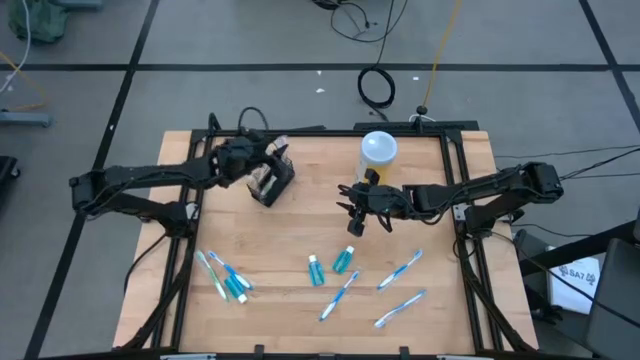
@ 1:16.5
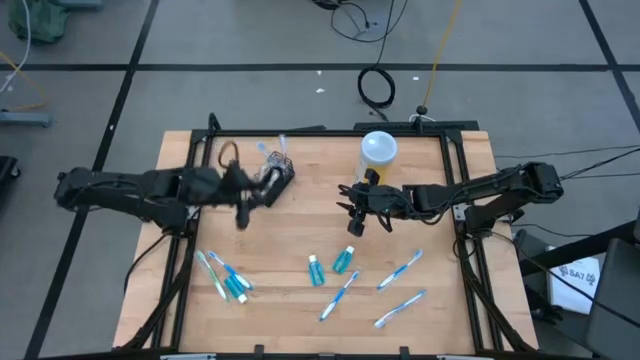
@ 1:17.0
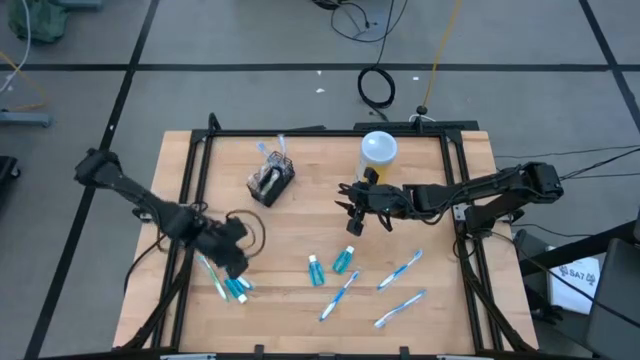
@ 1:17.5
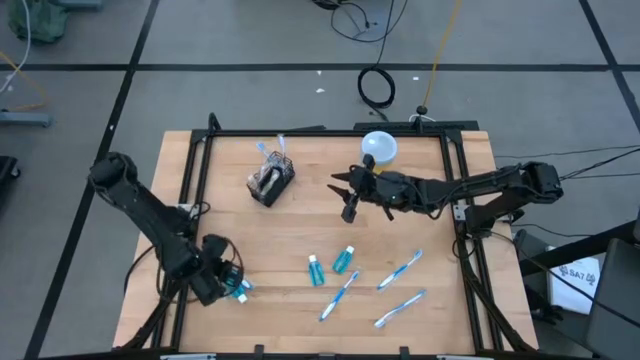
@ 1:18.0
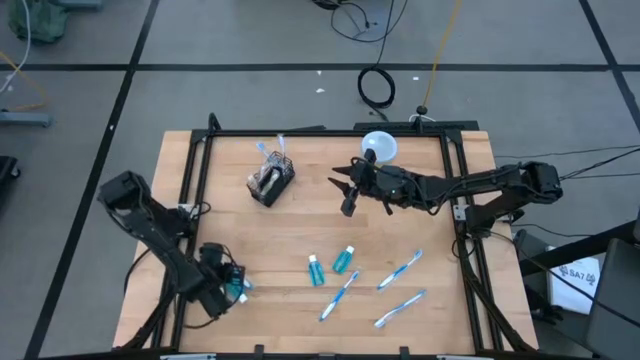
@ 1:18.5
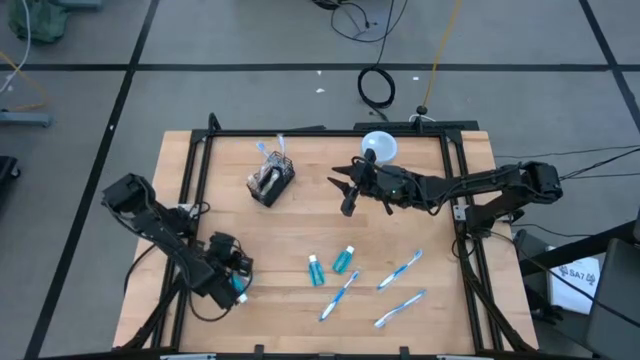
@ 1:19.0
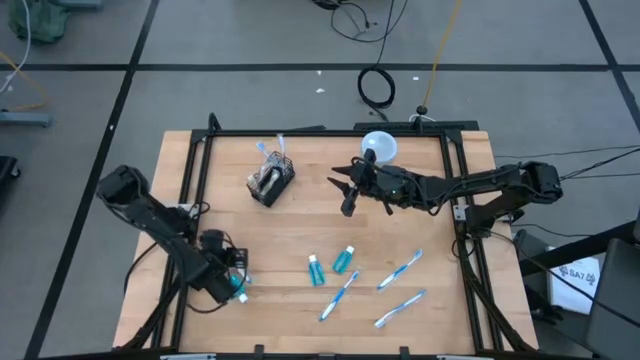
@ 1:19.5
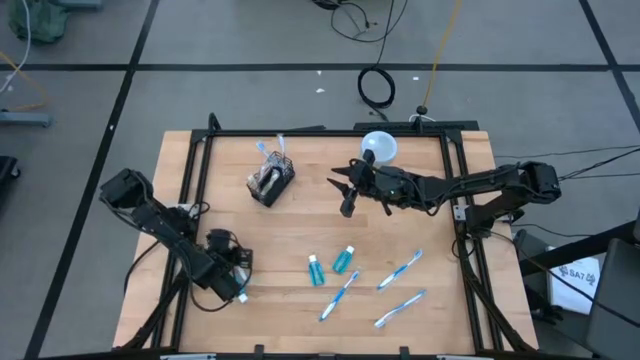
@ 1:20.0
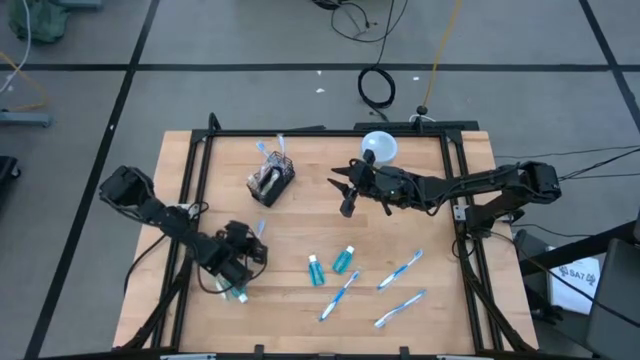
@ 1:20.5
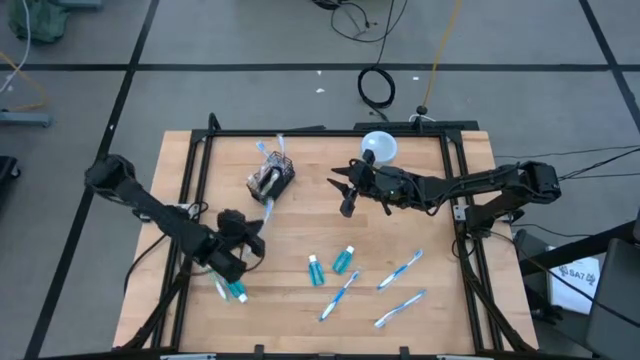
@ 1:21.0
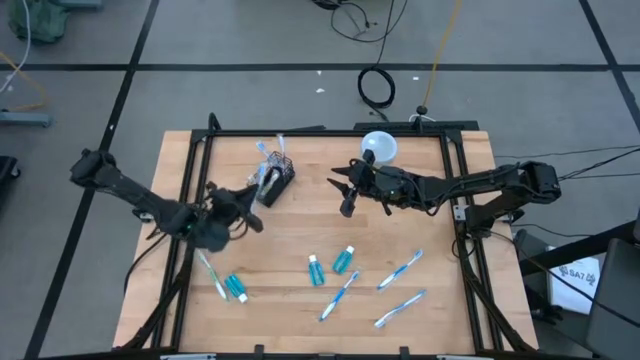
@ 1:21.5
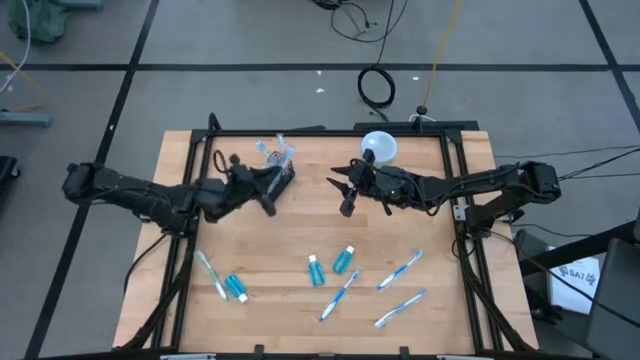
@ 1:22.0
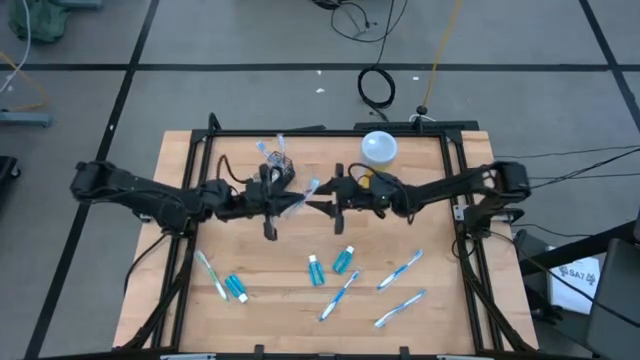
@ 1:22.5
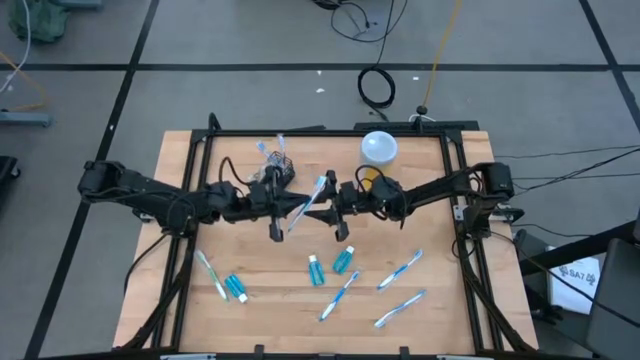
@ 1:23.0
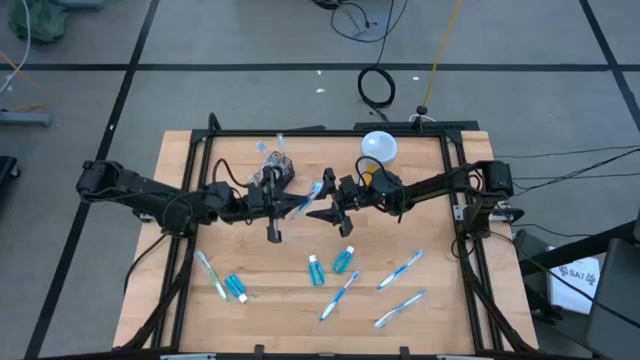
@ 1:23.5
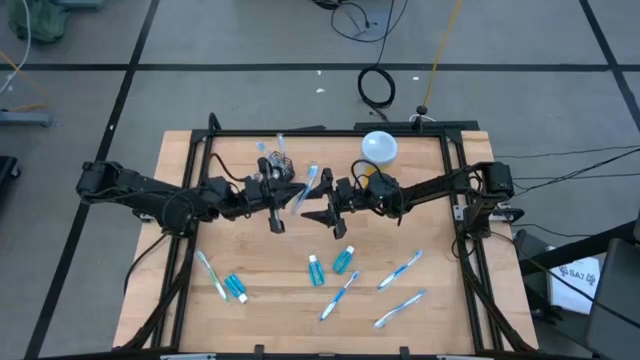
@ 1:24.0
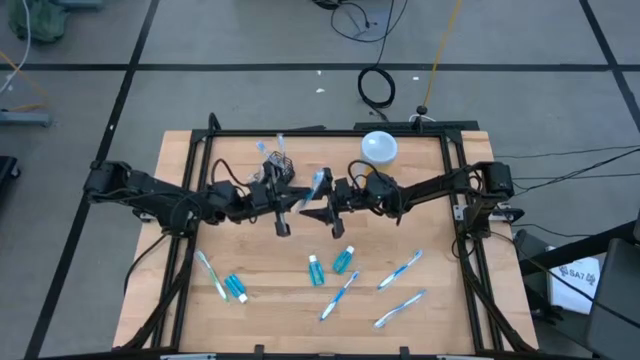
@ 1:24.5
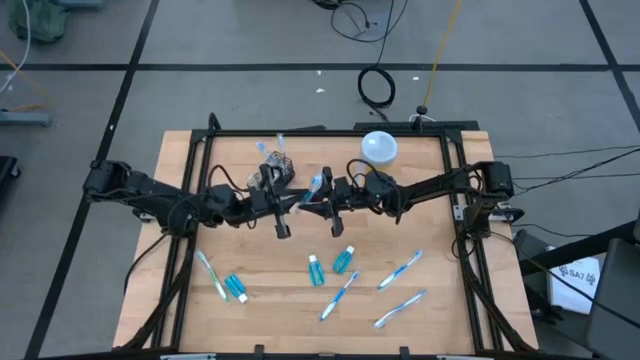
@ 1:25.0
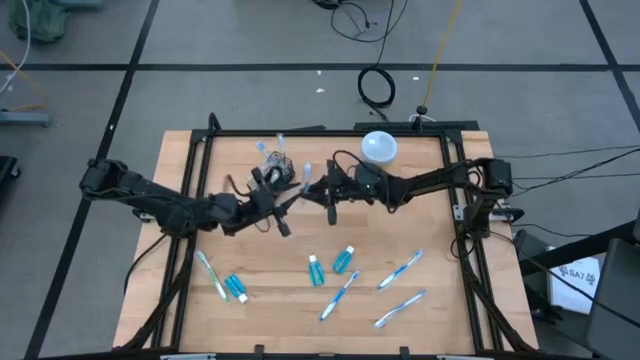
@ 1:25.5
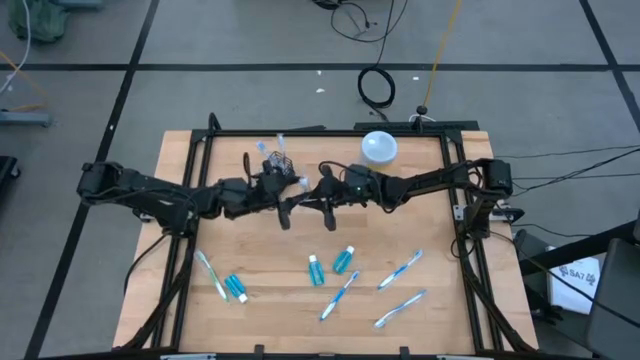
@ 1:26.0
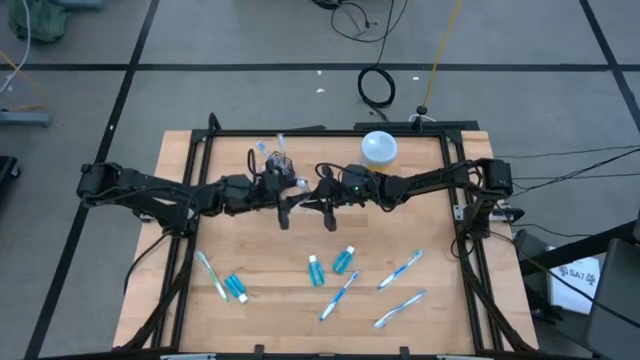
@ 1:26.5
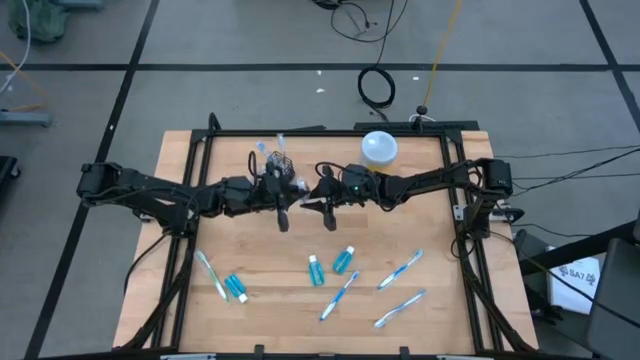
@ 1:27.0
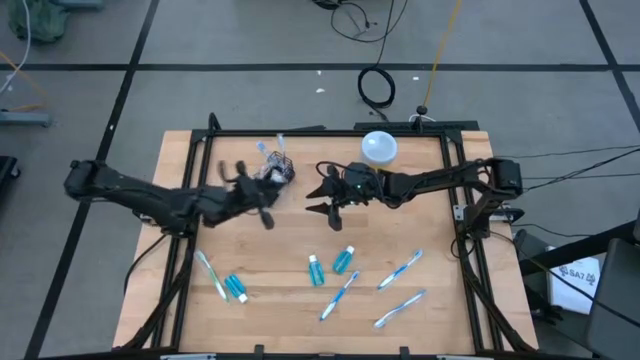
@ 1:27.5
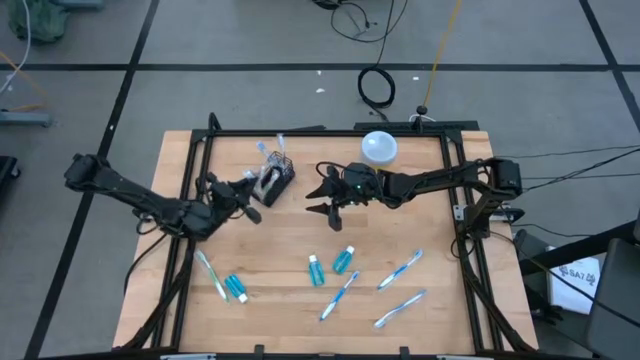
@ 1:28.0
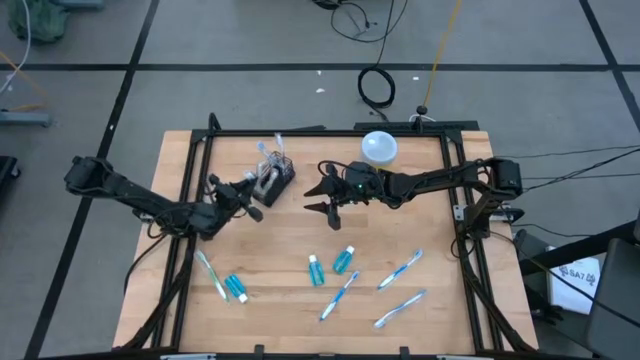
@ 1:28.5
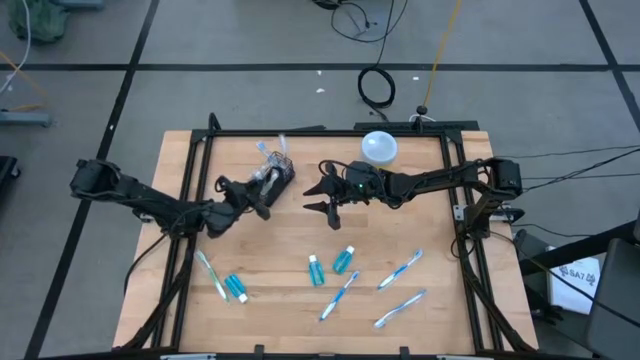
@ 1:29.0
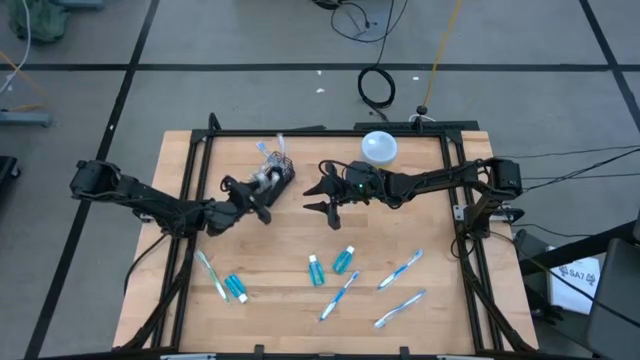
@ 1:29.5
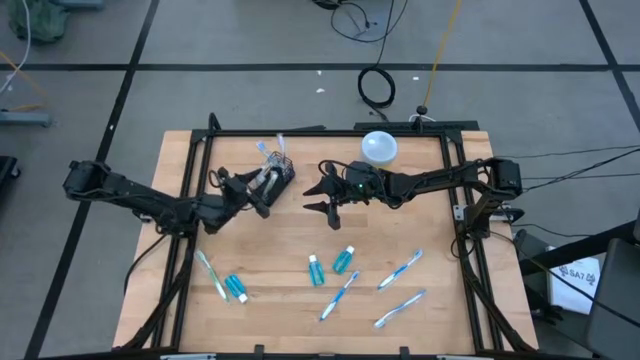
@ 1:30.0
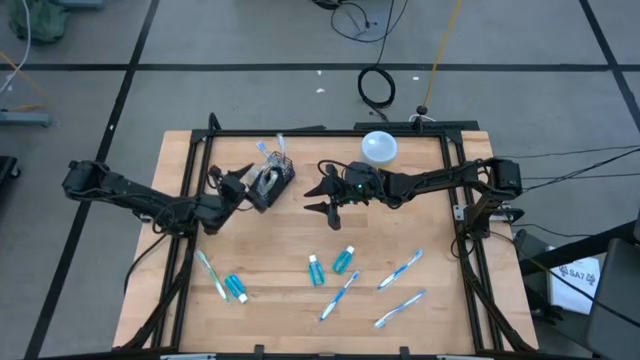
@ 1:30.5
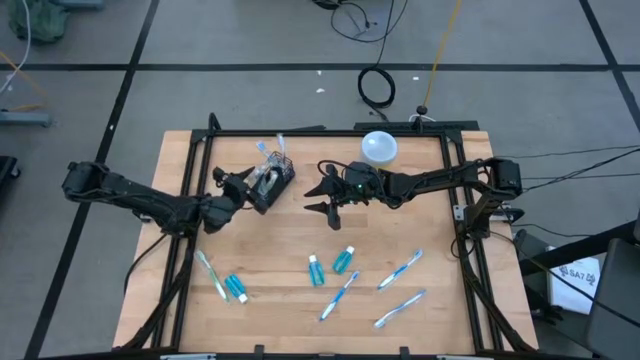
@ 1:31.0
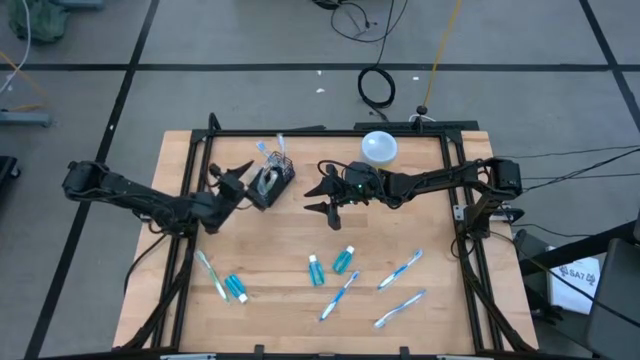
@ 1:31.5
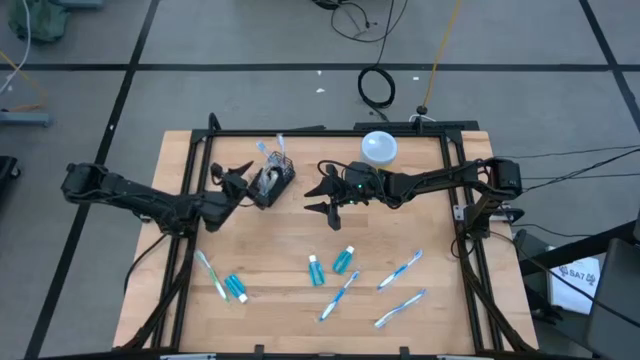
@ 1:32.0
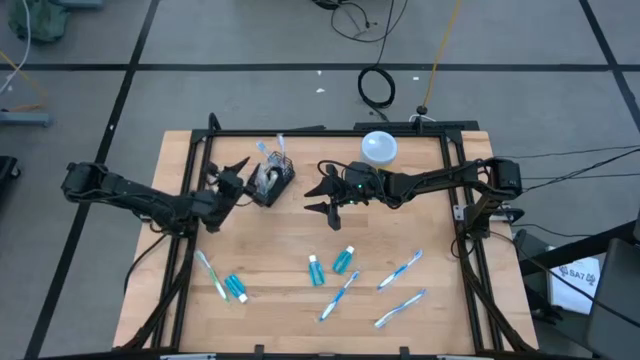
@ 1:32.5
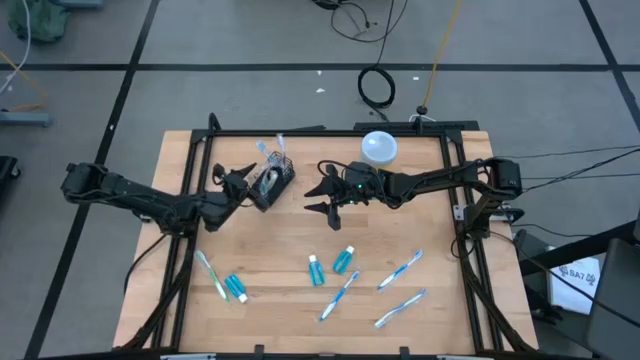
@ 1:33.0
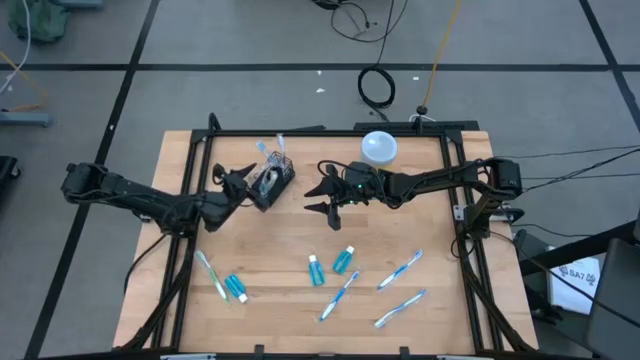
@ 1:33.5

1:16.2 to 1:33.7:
Task: Pick & Place toothbrushing station
Put the left blue toothbrush into the black wire organizer

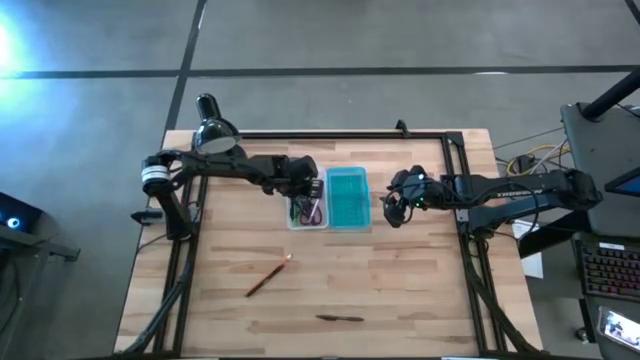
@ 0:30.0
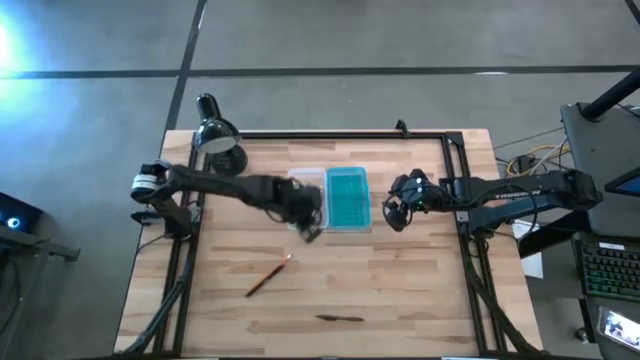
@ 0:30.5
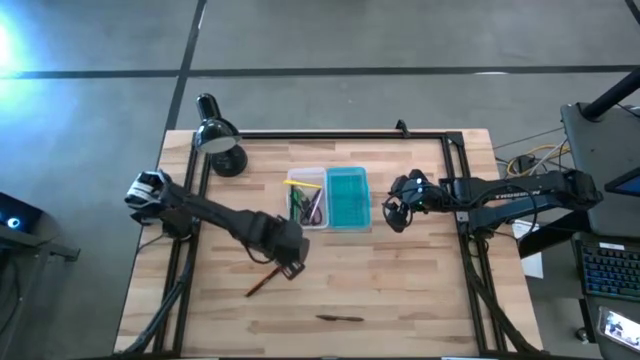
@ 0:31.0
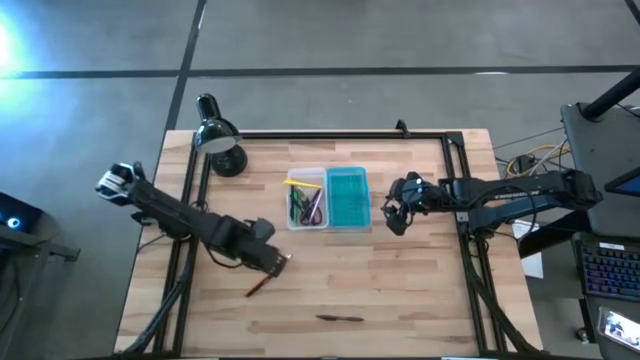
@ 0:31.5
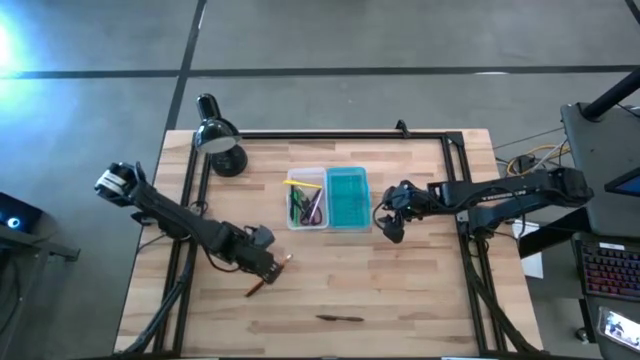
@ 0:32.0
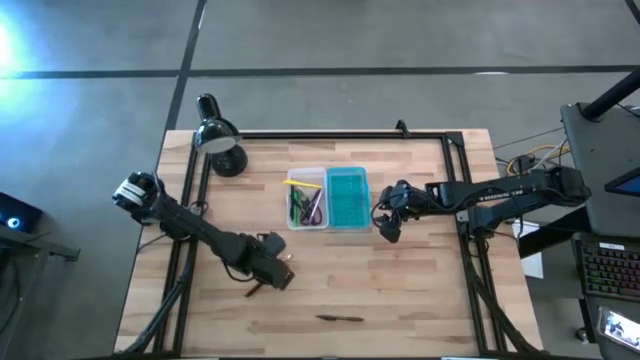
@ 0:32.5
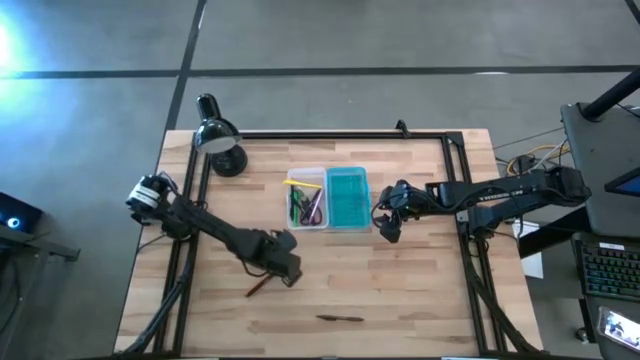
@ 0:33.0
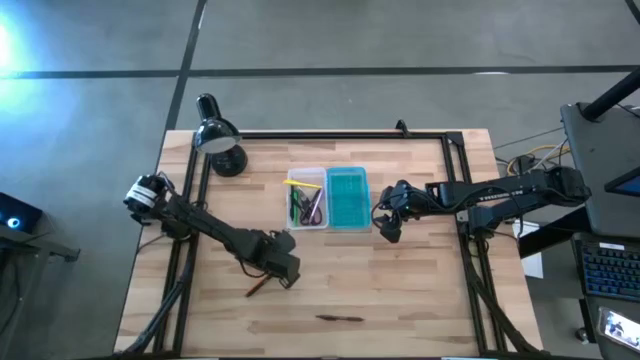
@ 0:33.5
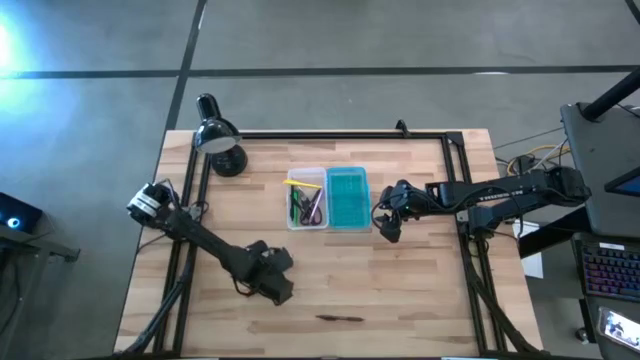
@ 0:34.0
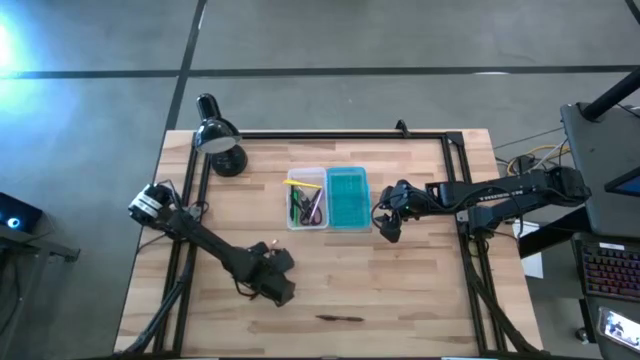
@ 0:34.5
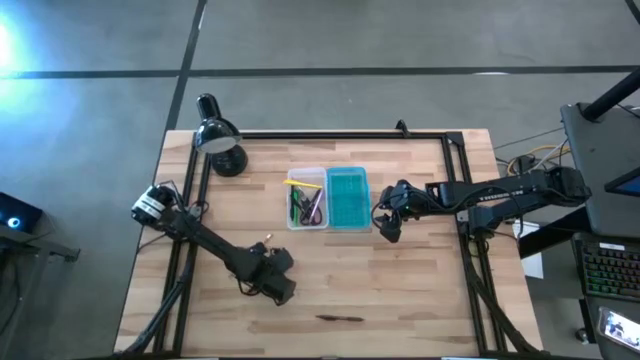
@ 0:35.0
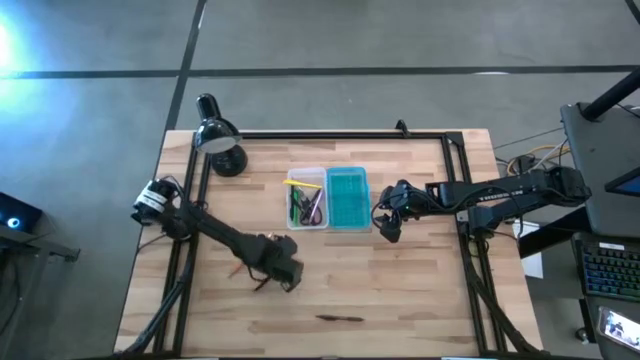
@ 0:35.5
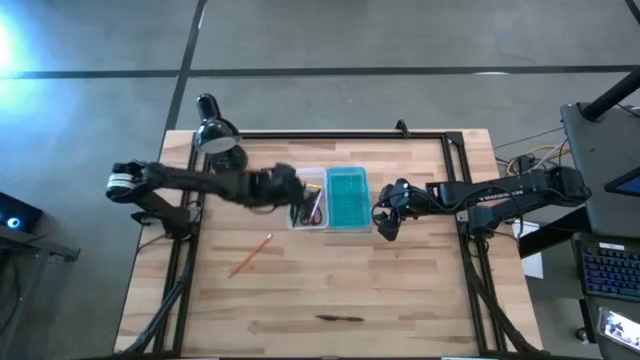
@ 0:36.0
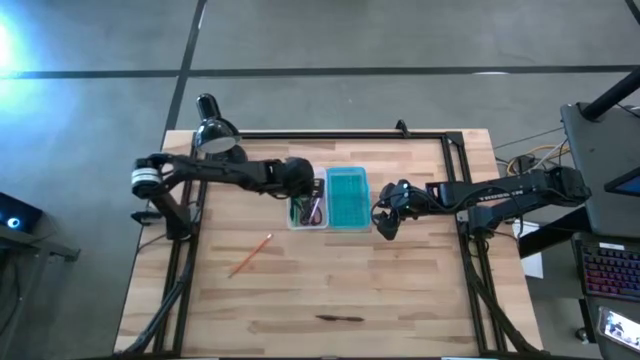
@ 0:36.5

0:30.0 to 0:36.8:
Task: Pick & place school supplies into a supply box
Put the black pen into the supply box
